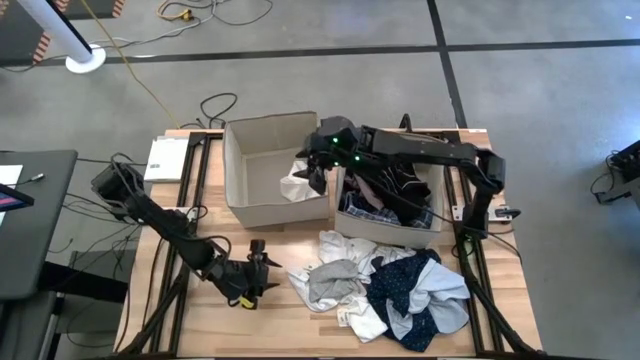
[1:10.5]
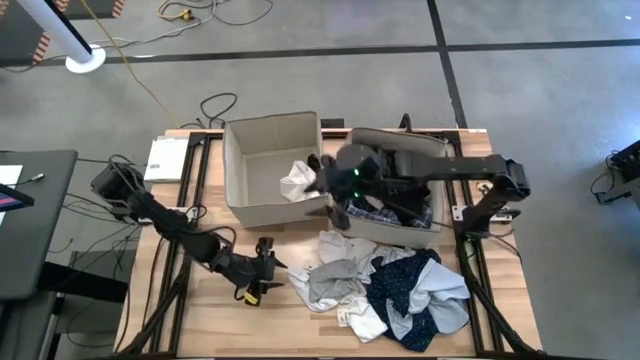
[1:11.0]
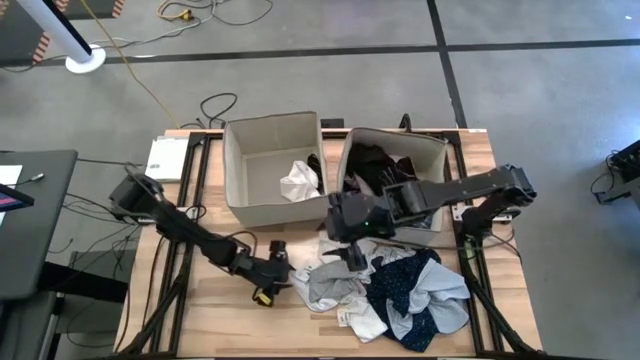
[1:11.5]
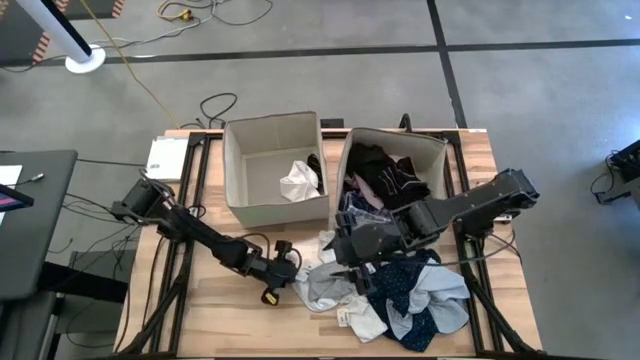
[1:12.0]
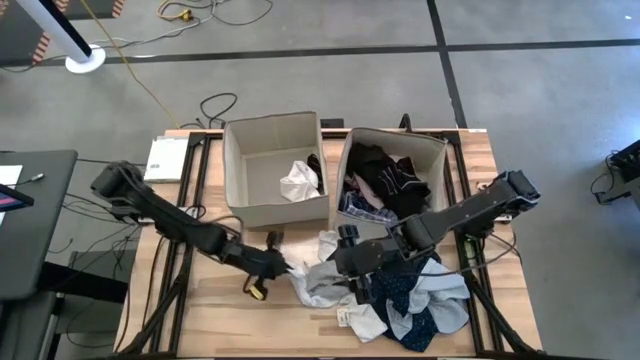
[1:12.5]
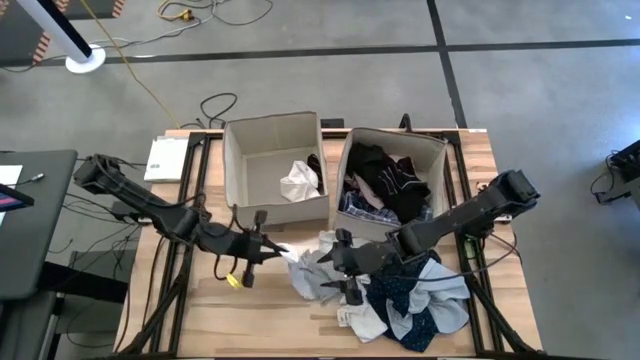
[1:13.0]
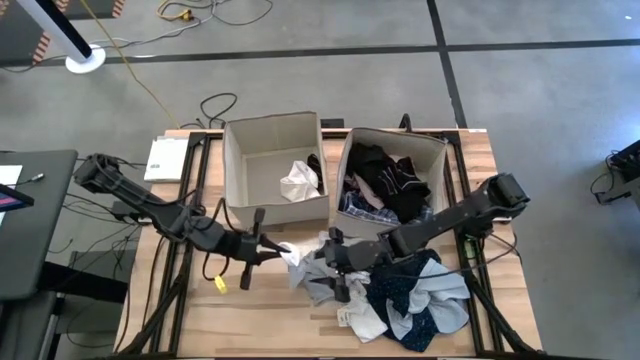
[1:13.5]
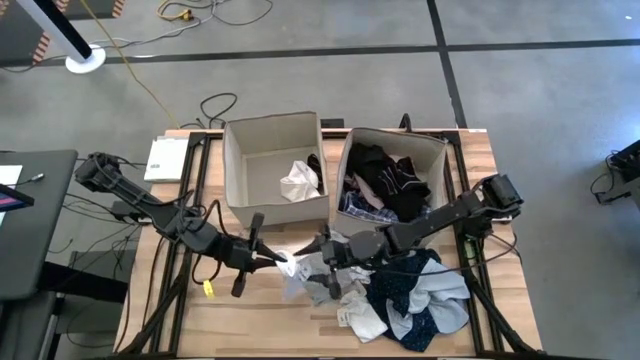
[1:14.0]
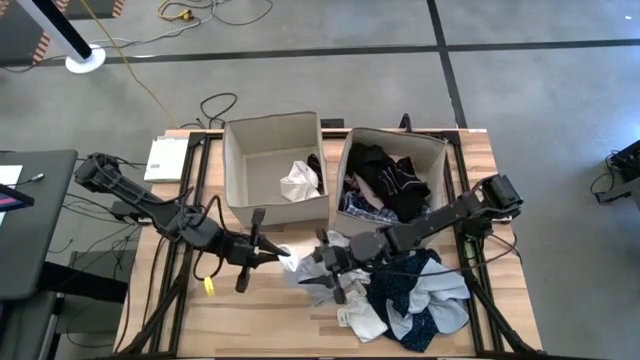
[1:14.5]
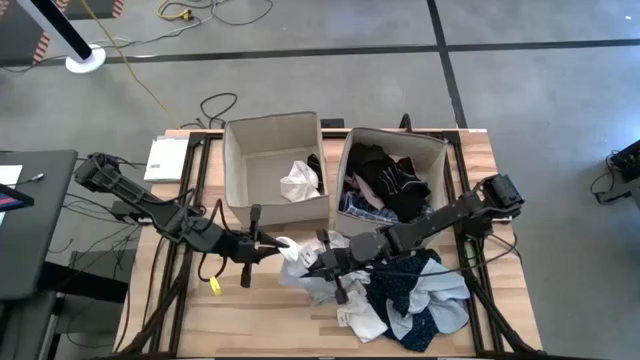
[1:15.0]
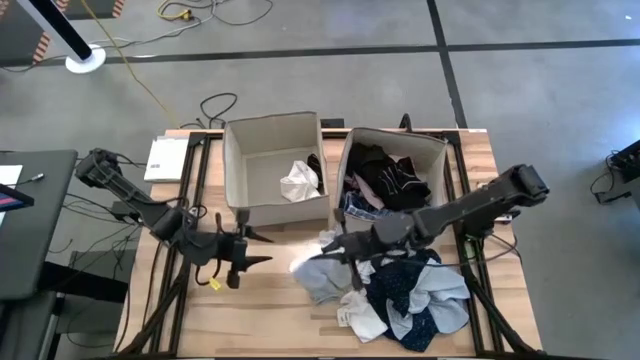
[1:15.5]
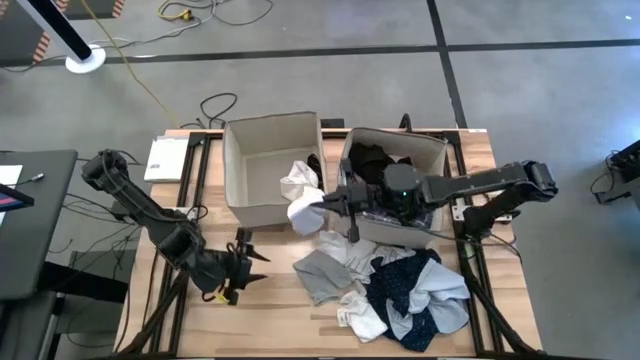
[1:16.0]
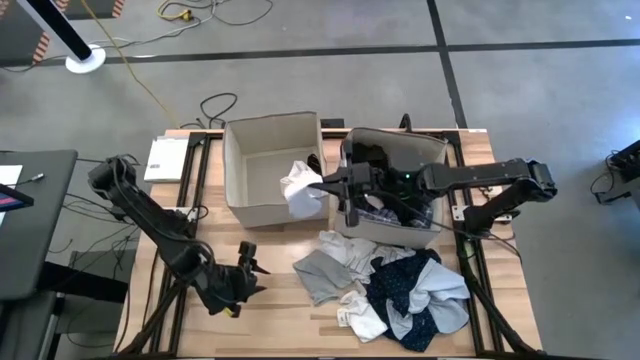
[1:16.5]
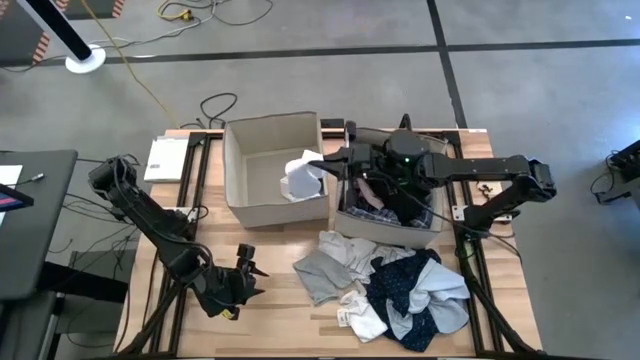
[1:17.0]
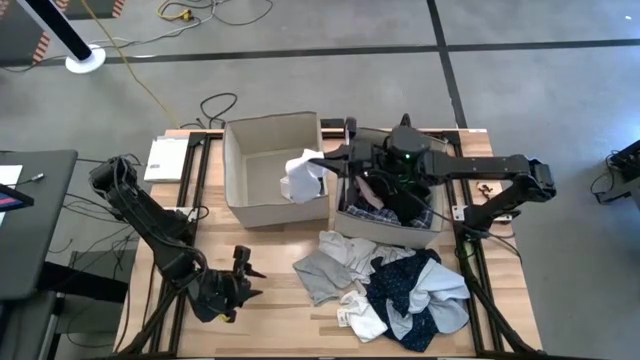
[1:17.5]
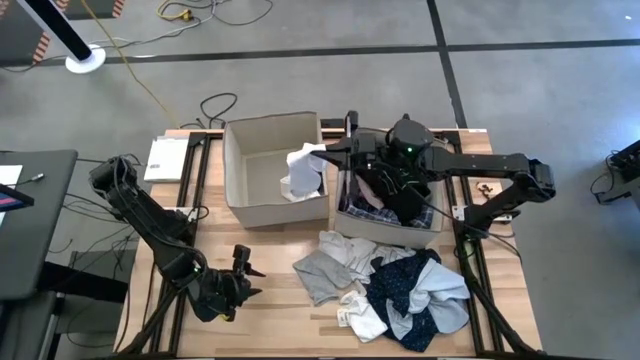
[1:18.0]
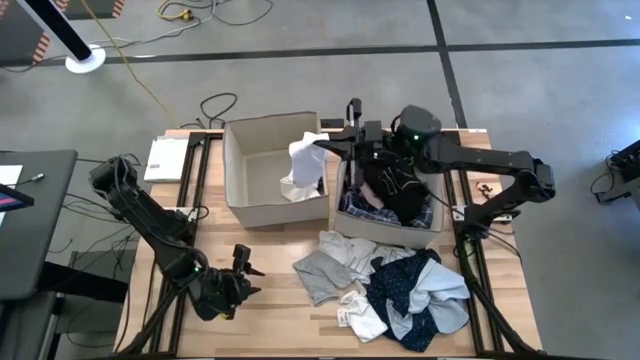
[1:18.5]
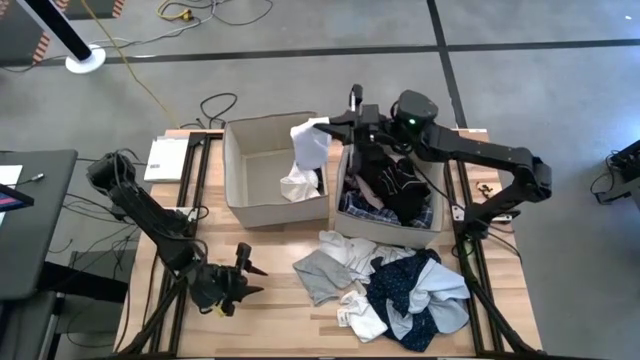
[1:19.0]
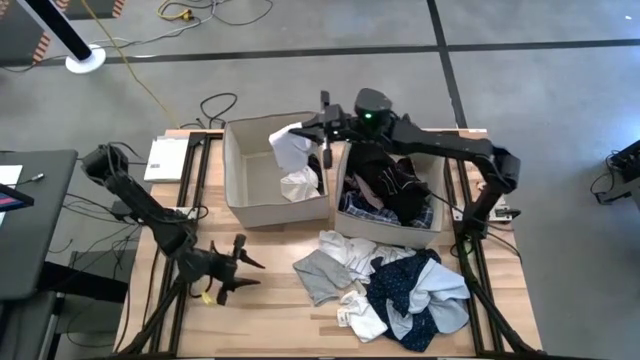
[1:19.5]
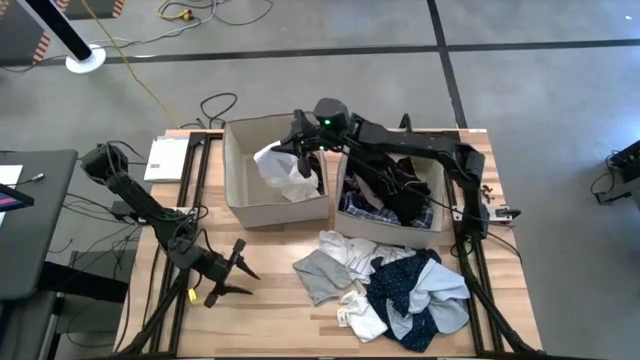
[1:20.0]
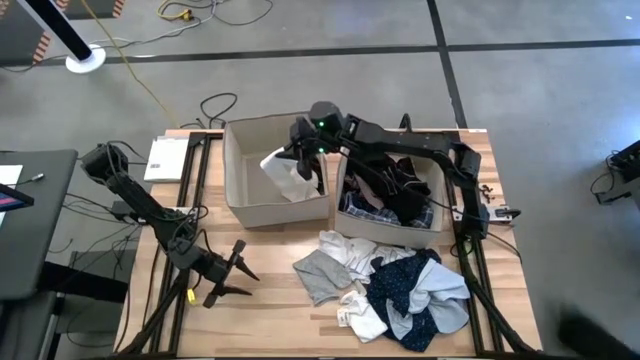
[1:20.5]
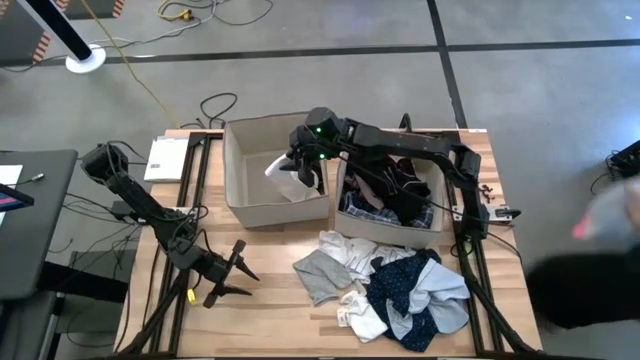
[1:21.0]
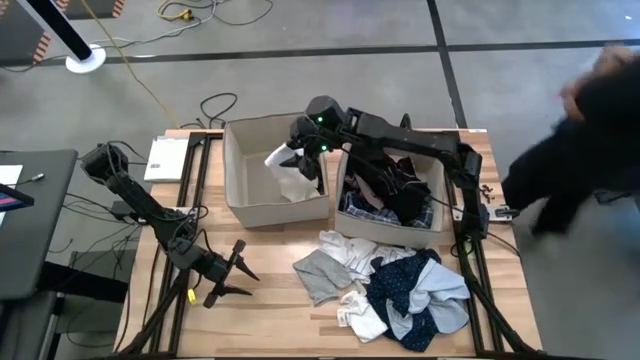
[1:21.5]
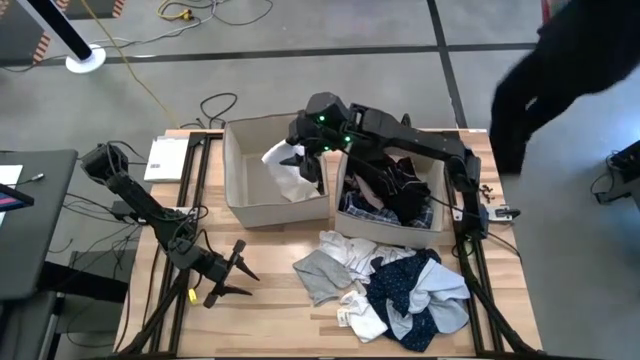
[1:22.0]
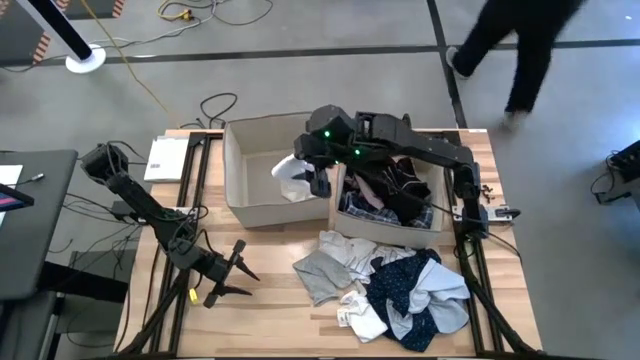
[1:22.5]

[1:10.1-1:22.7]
Task: Sort clothes
Put the white sock into the left white laundry bin

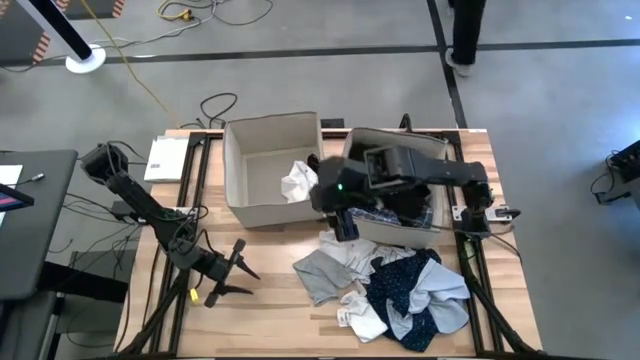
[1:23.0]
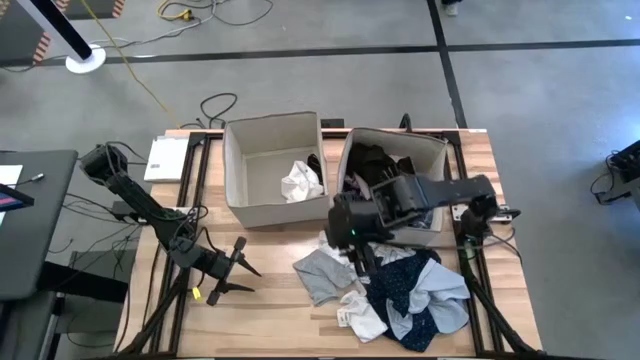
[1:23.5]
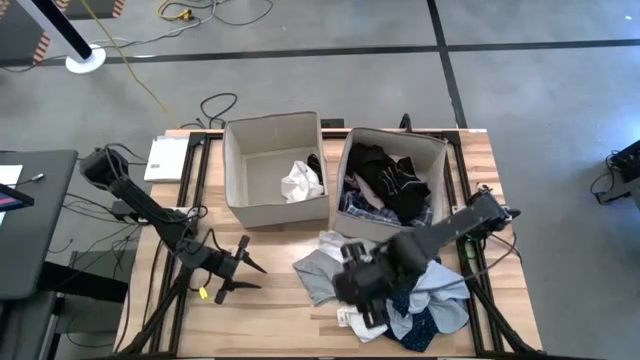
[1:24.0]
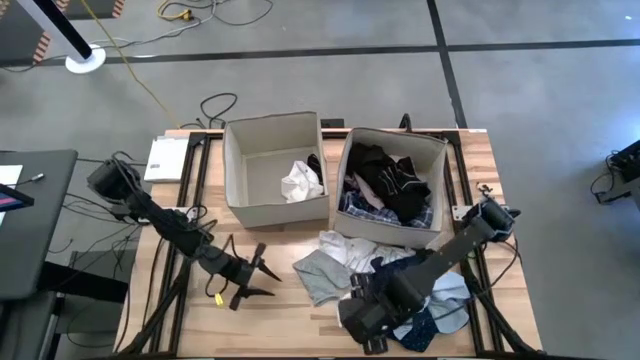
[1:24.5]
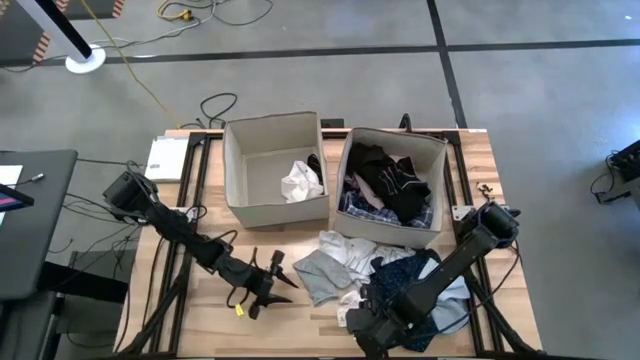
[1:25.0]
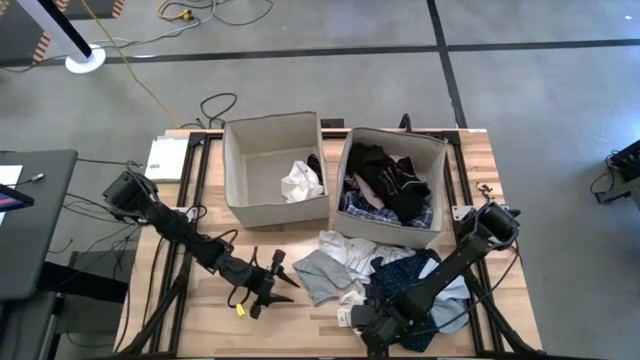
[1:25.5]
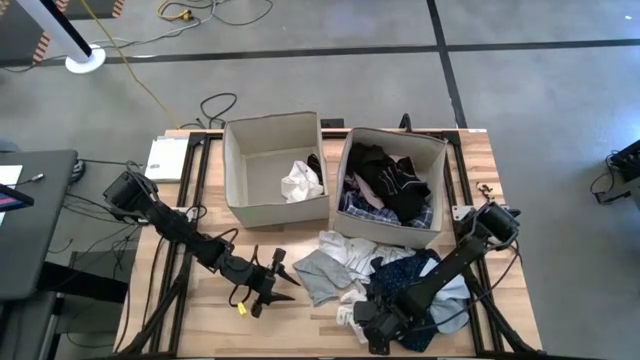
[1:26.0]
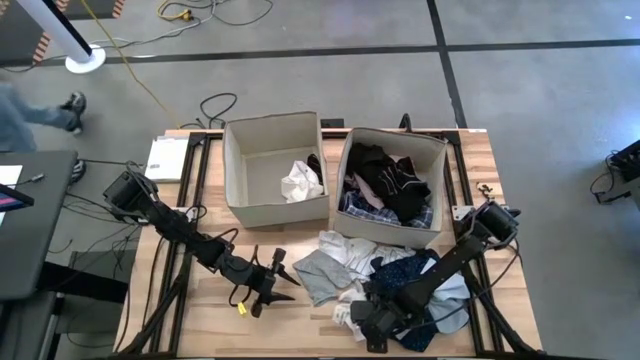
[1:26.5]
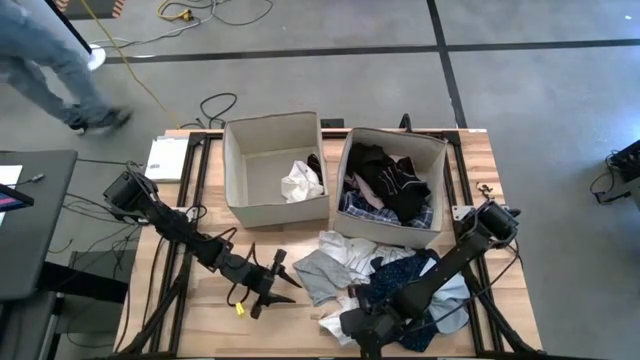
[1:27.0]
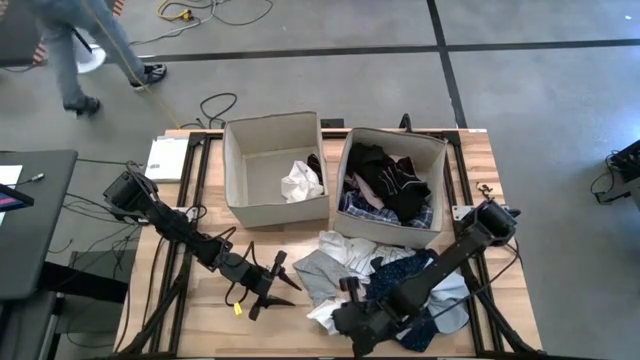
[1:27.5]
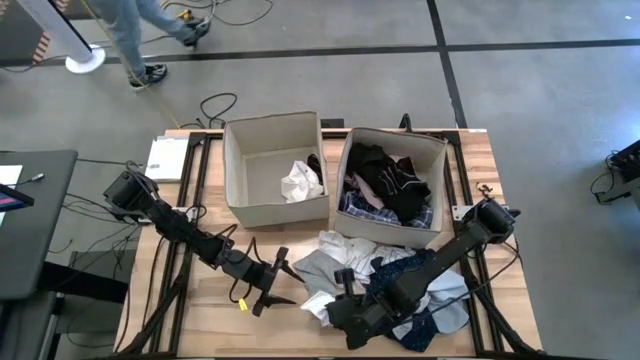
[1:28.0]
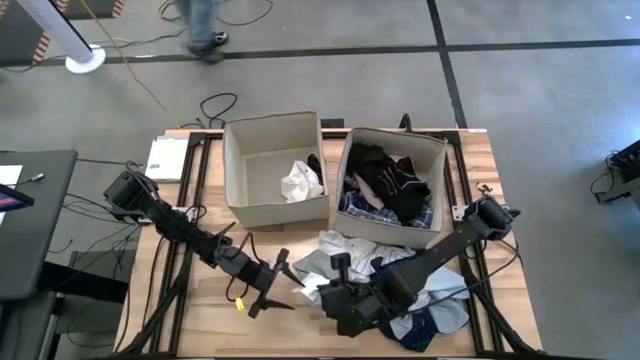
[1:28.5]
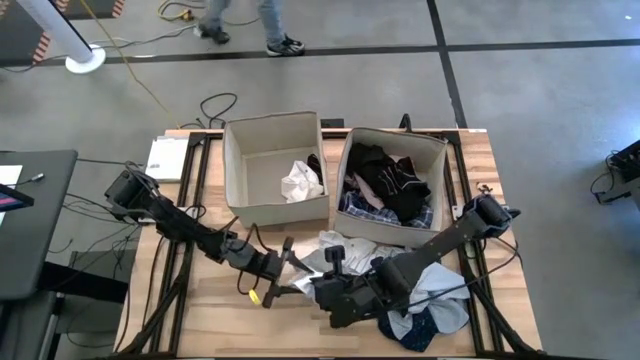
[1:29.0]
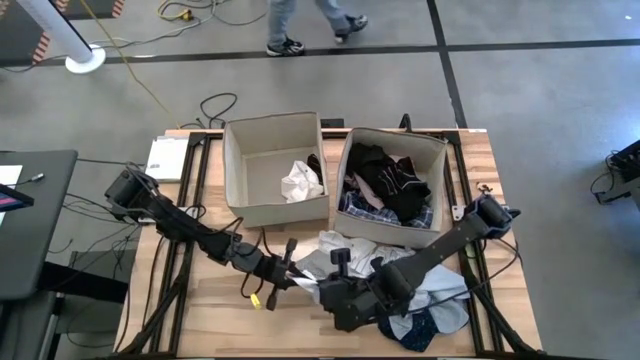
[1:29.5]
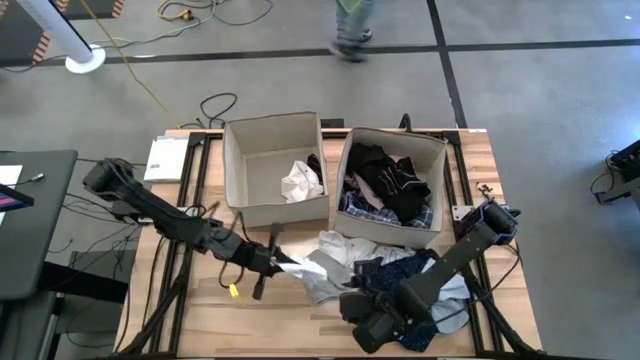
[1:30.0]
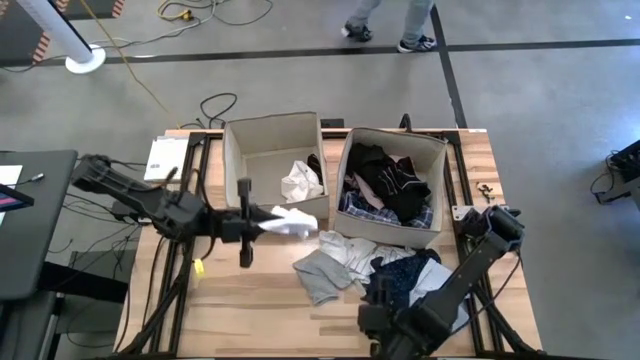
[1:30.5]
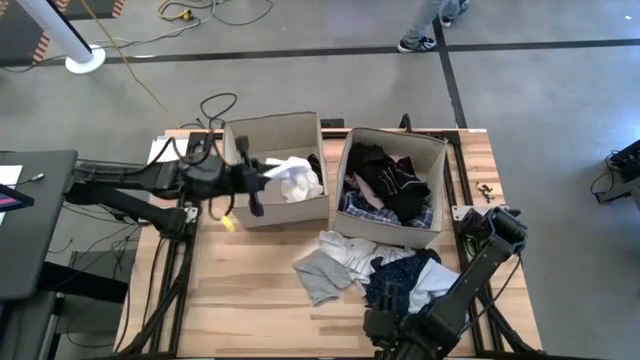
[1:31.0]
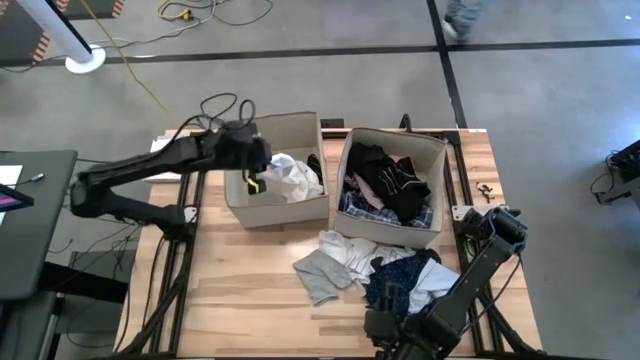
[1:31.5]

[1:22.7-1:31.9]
Put the white sock into the left white laundry bin
